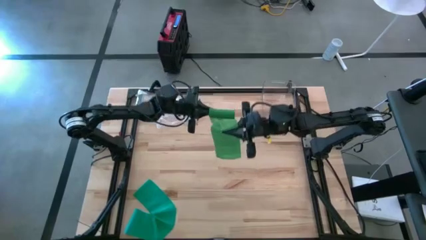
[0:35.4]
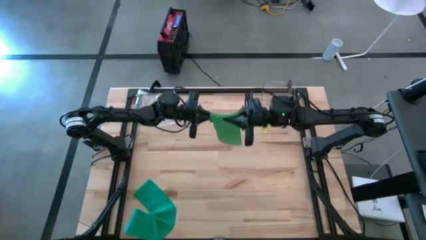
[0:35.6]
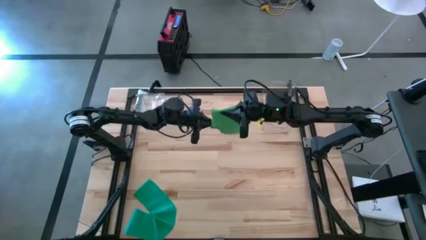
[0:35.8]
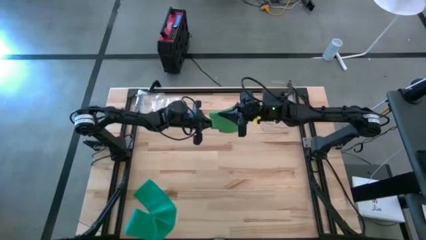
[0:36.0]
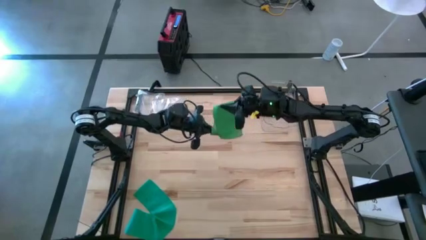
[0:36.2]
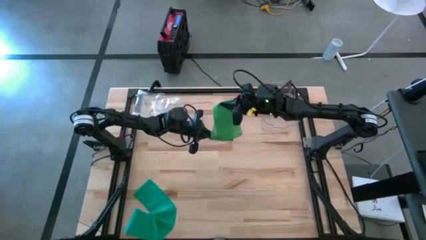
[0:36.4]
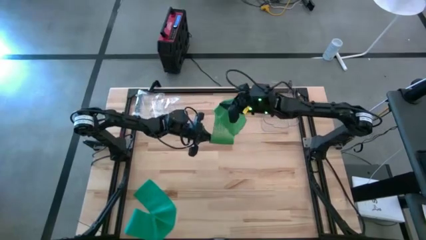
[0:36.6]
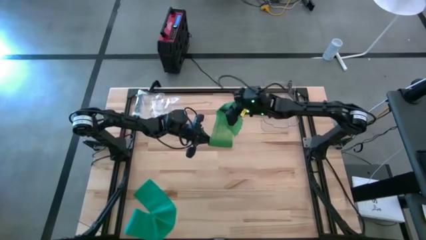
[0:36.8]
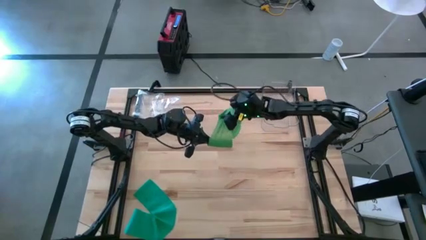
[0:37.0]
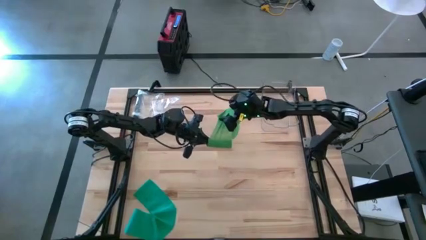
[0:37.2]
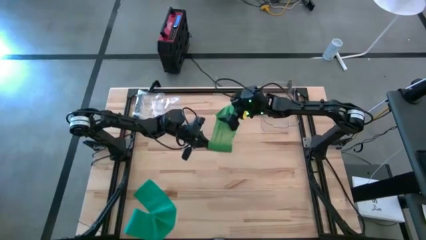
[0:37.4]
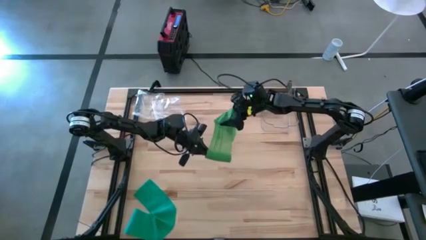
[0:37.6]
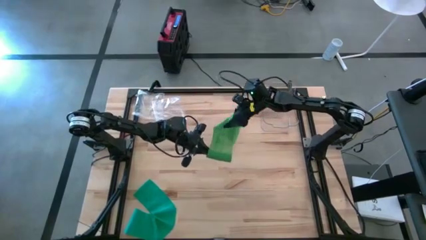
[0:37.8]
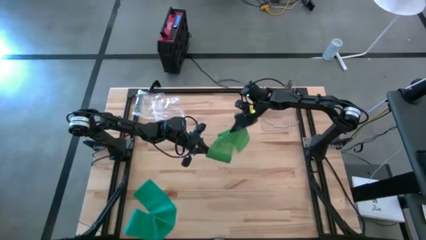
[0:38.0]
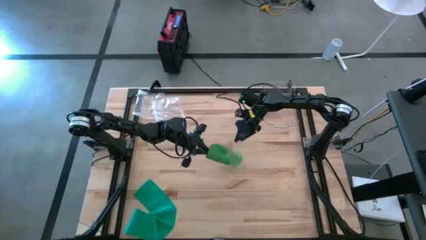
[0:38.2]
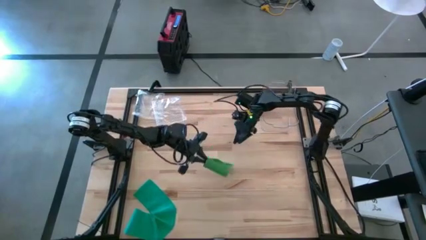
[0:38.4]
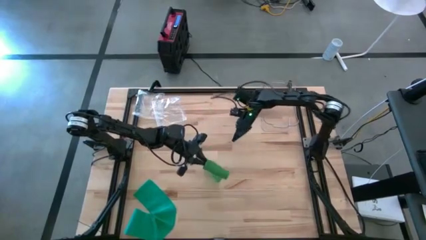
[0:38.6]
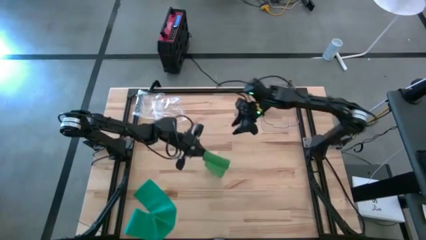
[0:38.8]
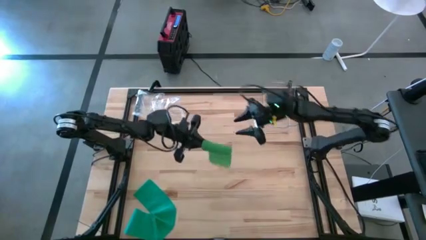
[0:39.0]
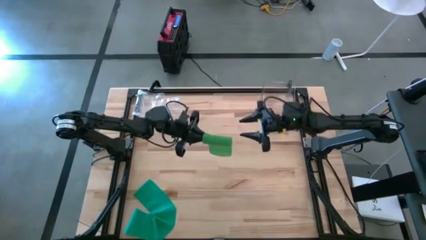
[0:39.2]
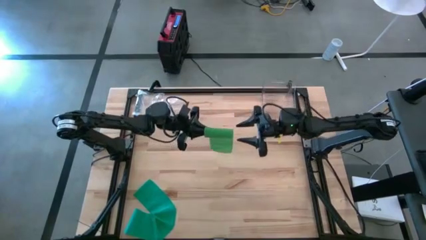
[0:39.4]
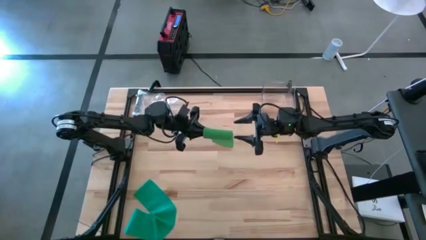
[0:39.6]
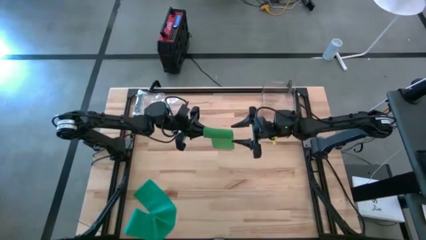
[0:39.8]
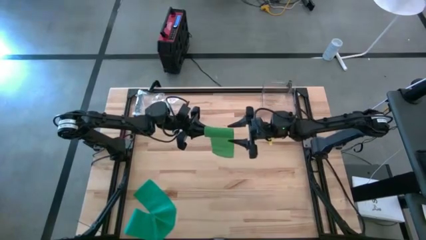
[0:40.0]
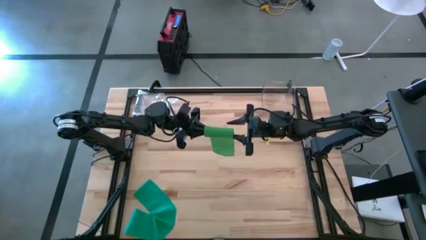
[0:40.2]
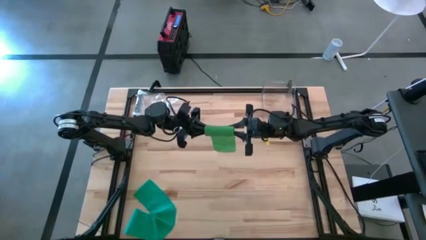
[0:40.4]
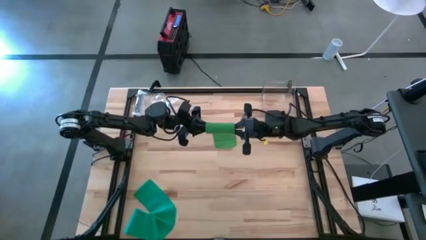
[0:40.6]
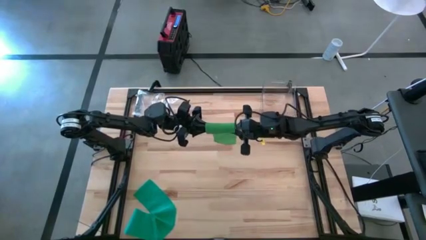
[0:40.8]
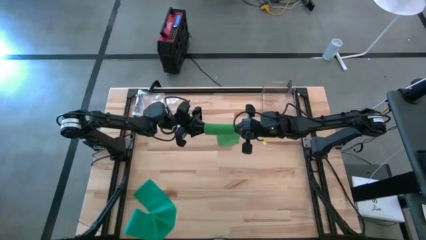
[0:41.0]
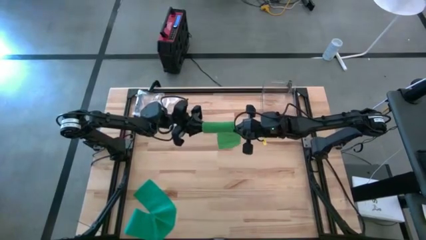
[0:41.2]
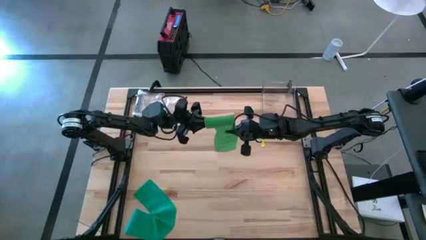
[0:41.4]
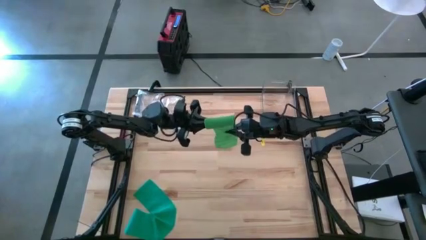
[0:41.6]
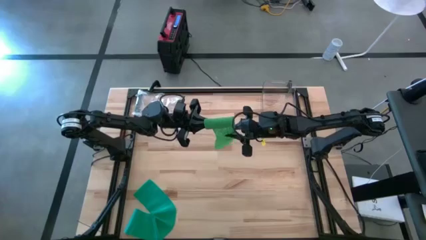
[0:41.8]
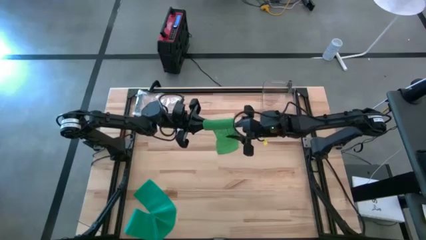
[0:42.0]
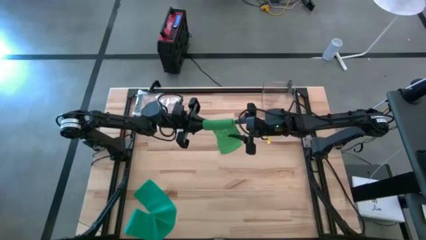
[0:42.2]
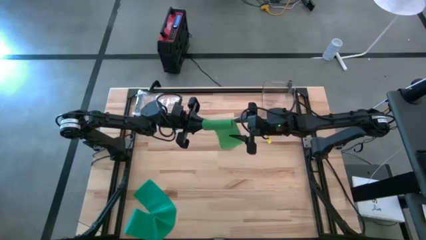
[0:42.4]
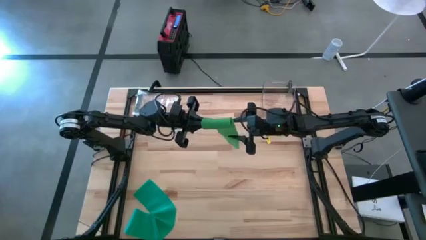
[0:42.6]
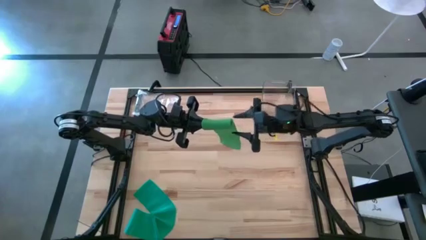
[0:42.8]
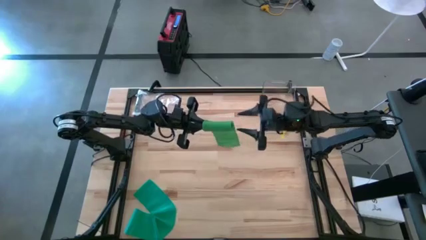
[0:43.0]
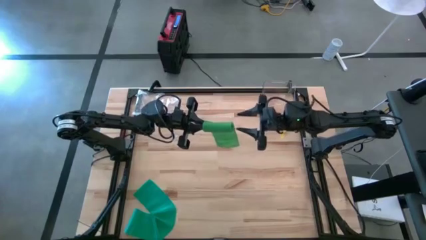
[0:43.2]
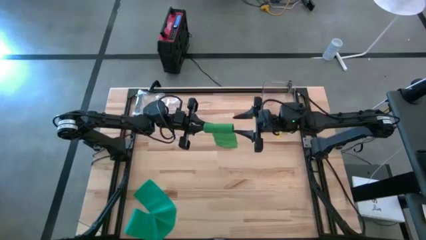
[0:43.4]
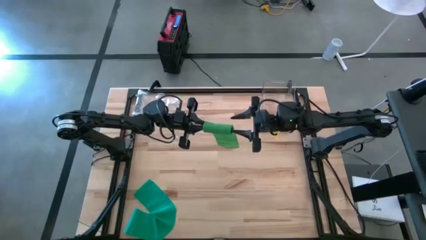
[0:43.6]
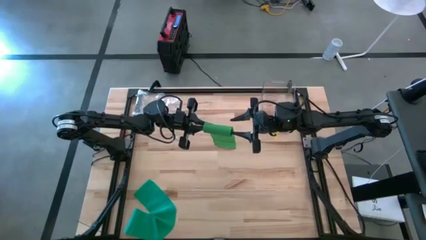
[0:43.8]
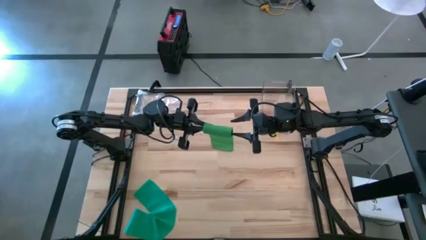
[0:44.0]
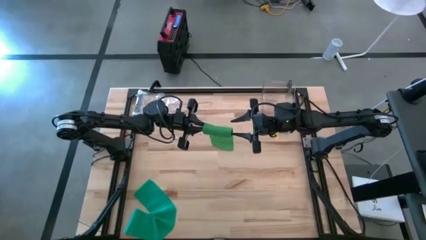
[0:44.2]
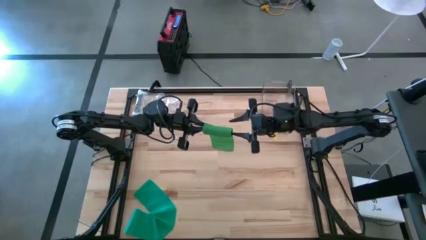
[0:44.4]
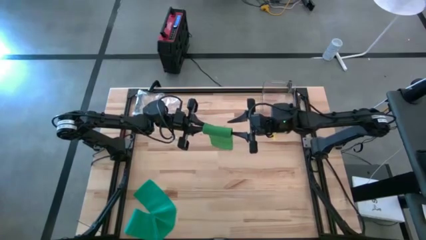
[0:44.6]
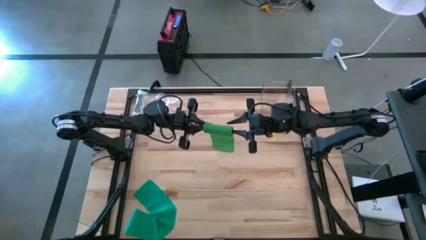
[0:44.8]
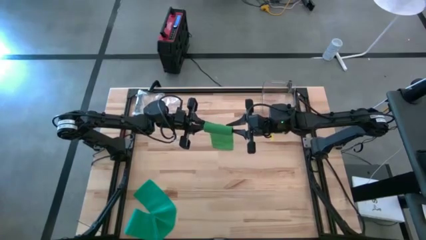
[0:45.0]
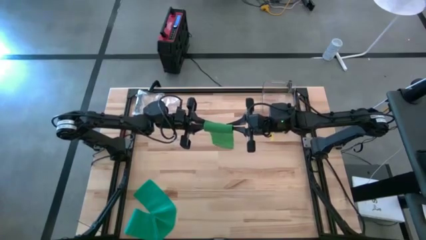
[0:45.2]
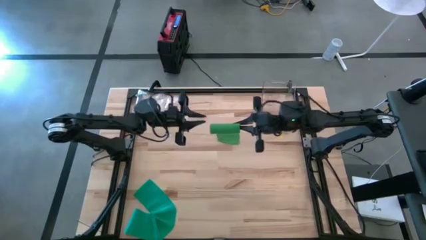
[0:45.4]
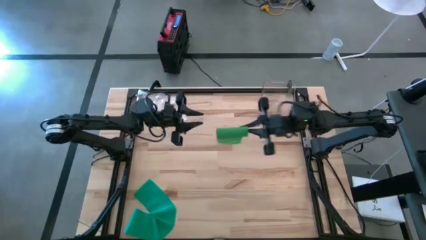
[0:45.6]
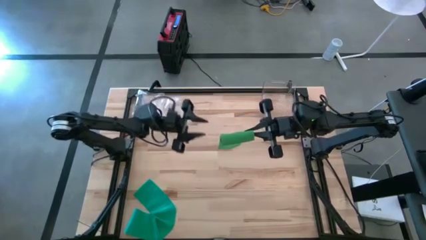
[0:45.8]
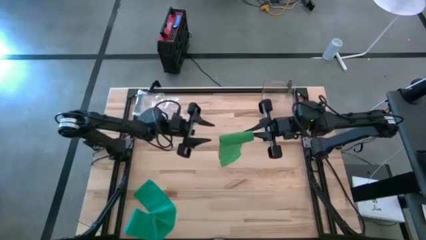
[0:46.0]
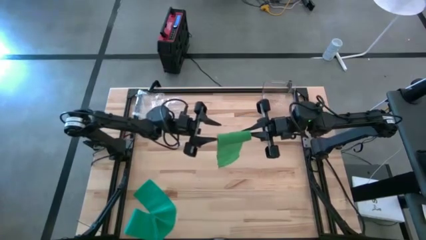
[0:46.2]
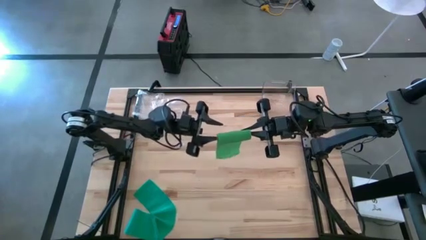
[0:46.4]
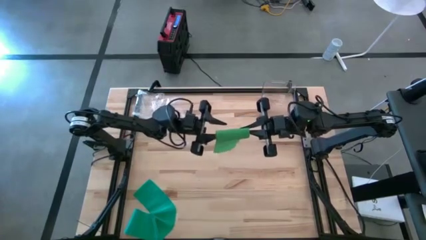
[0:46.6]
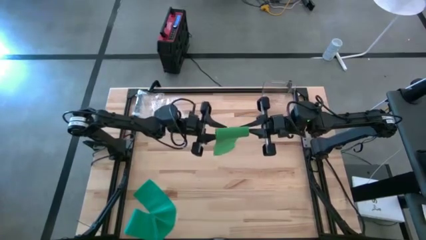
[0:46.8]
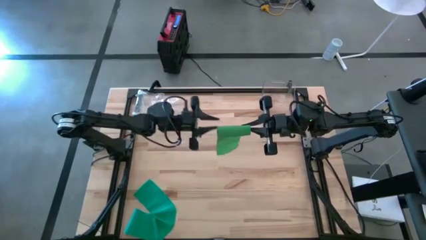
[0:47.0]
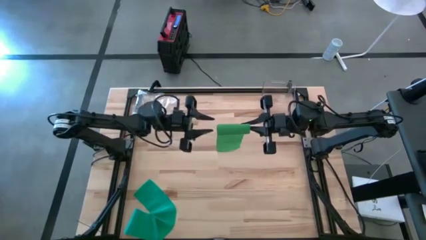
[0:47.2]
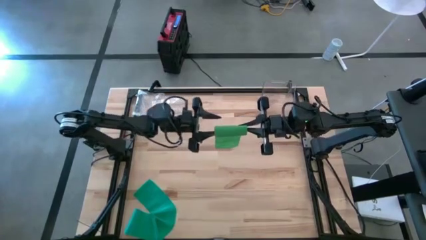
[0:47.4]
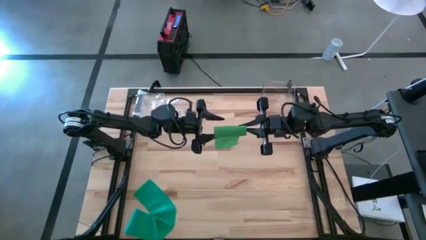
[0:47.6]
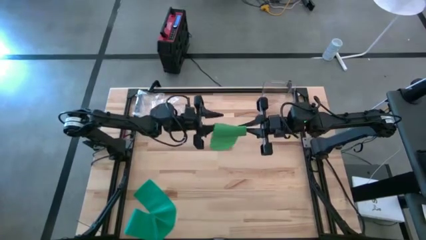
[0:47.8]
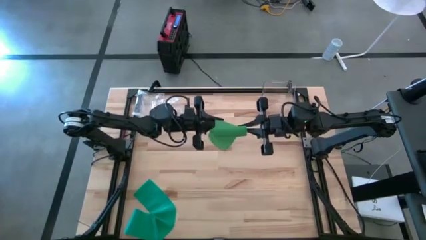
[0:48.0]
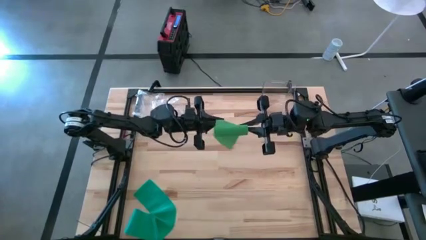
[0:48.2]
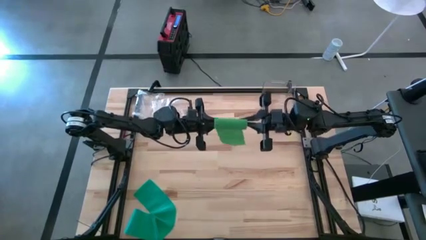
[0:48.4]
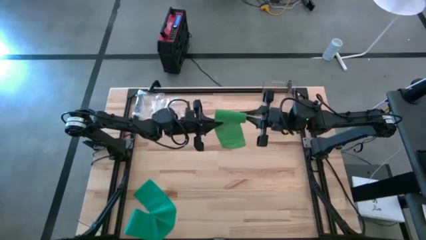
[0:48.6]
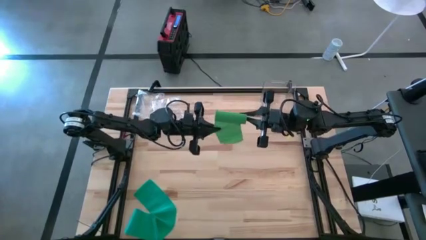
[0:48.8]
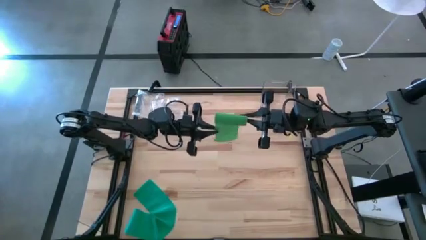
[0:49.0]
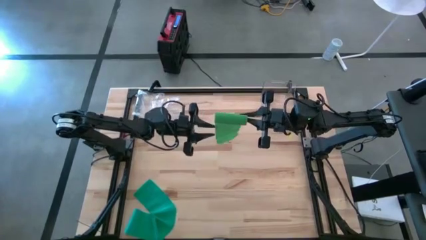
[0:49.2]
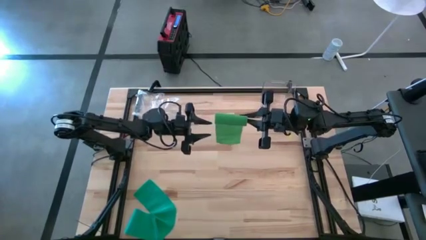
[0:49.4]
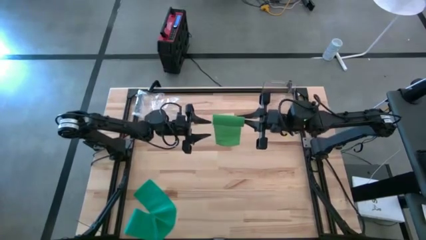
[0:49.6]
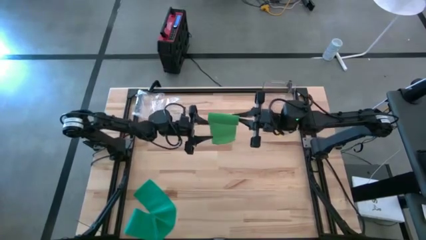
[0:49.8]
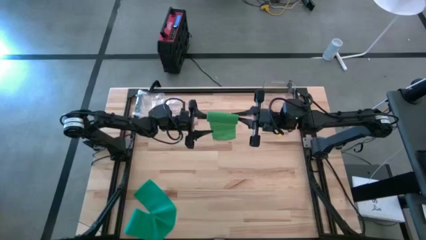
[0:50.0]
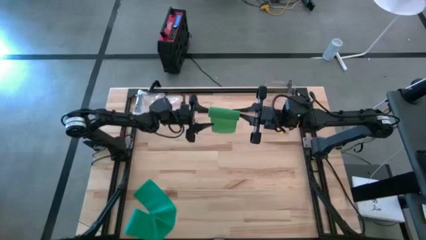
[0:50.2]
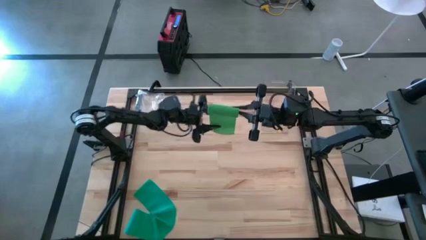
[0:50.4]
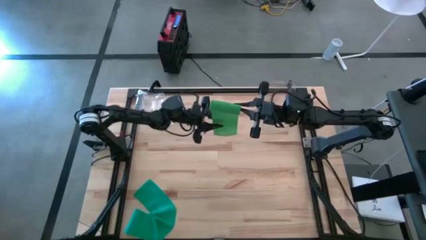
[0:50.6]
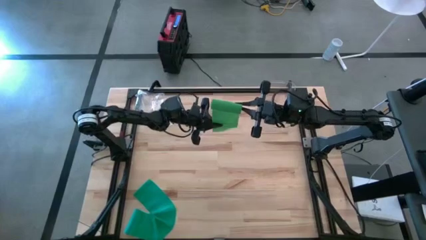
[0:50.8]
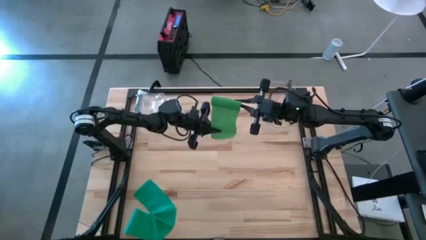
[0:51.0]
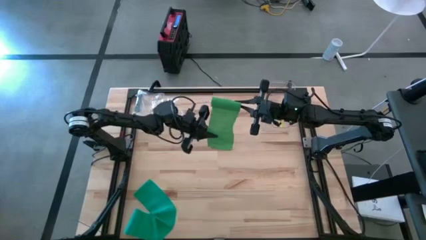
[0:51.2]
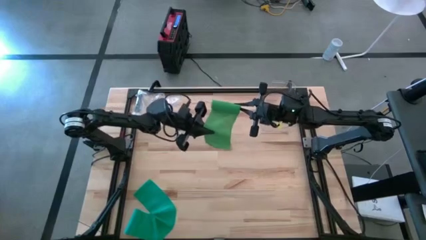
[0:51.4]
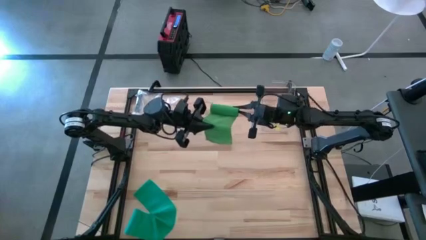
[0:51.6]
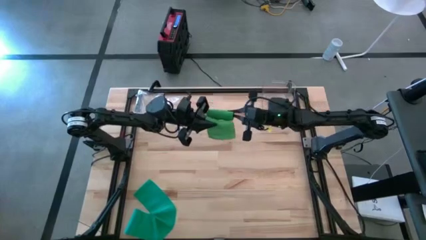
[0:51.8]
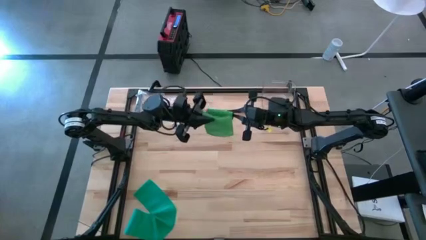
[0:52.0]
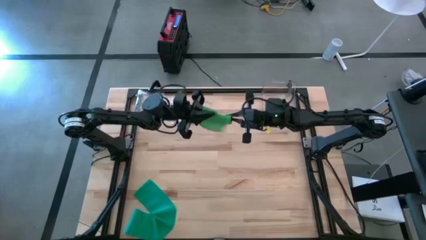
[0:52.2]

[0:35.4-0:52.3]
Task: Roll bandage
Roll the green bandage
